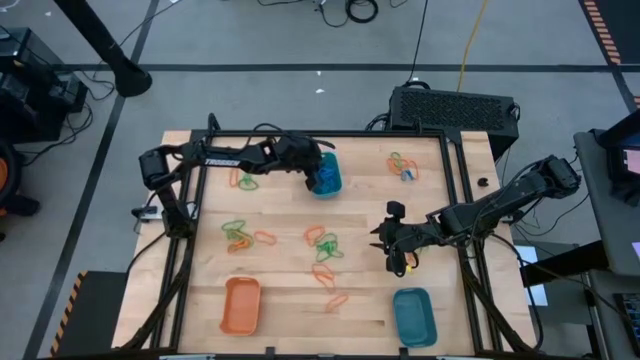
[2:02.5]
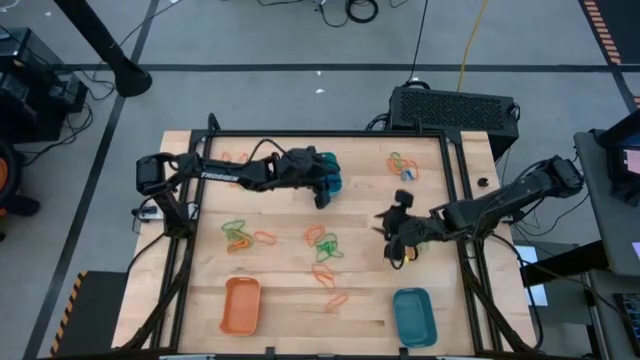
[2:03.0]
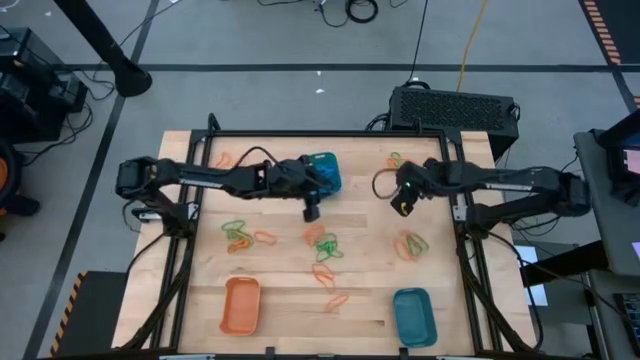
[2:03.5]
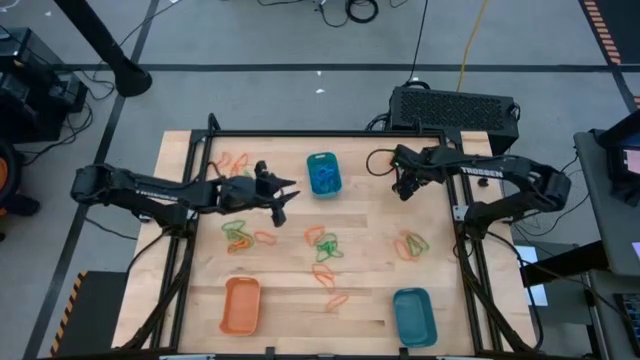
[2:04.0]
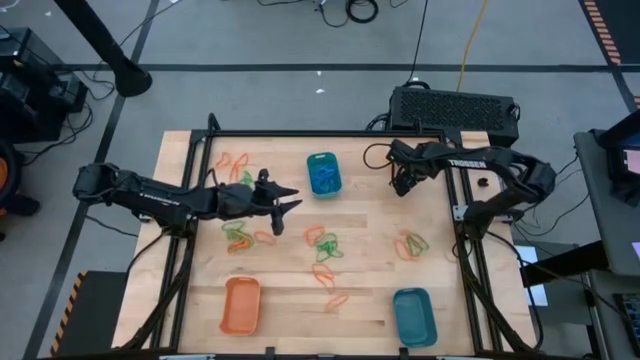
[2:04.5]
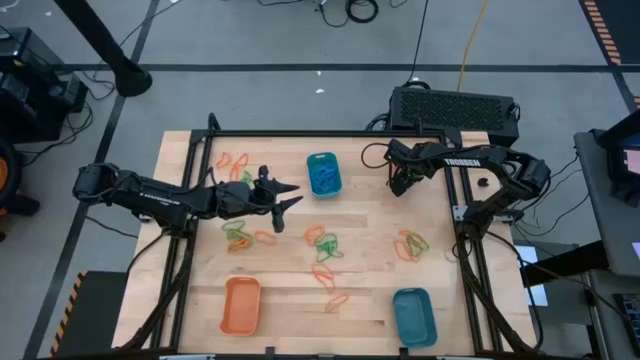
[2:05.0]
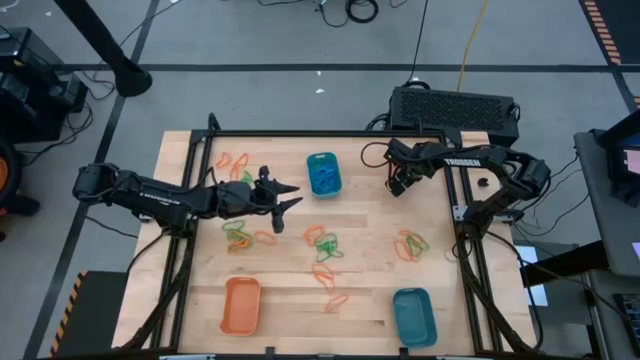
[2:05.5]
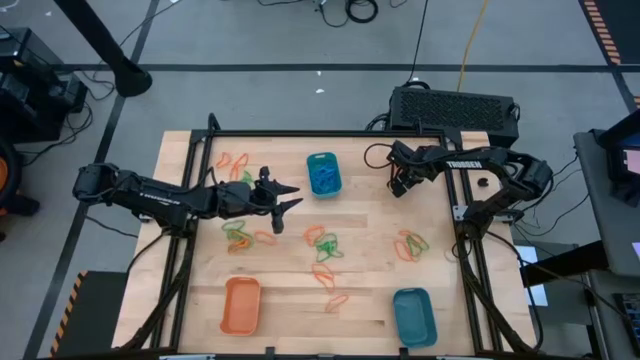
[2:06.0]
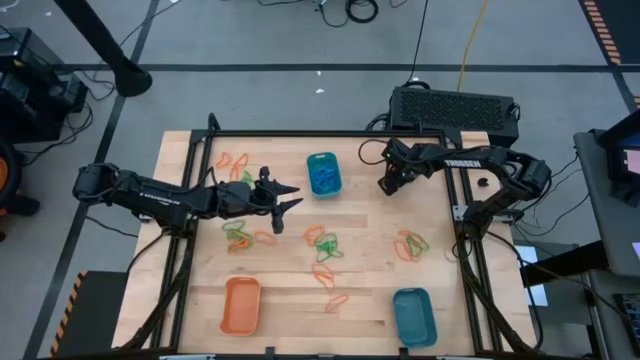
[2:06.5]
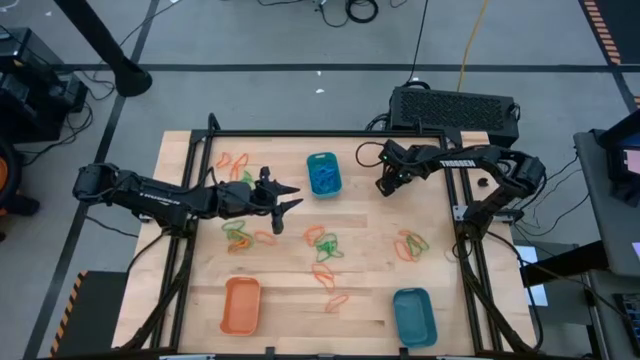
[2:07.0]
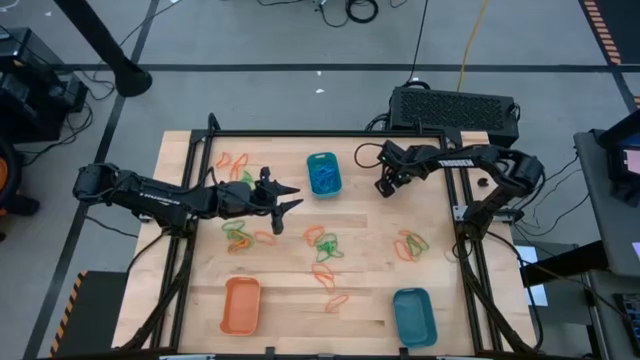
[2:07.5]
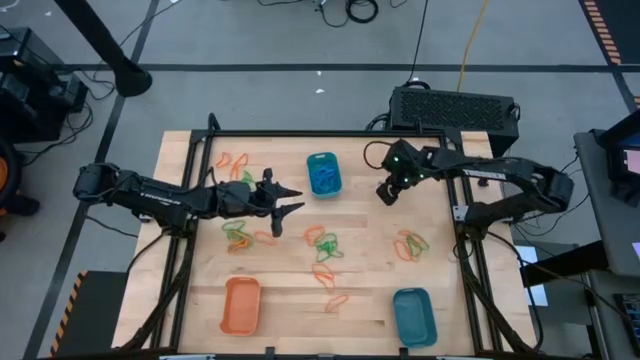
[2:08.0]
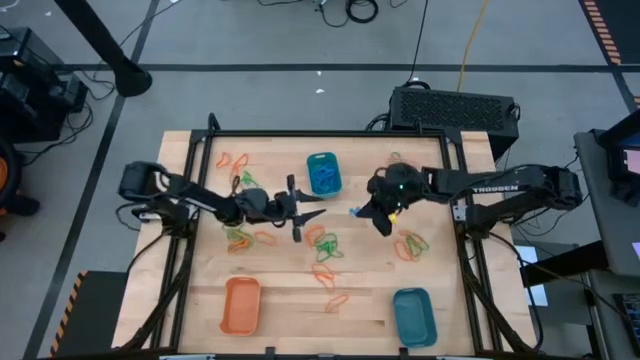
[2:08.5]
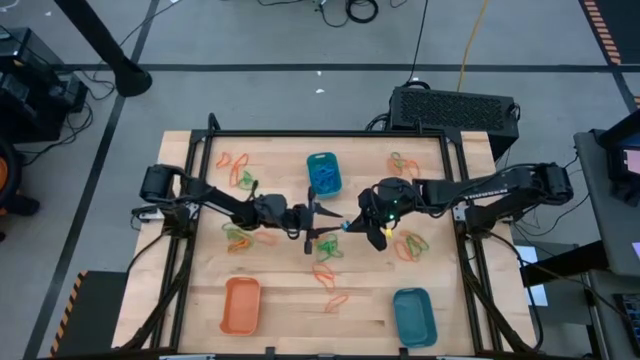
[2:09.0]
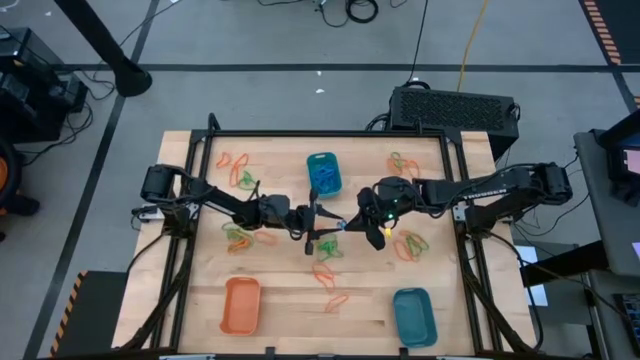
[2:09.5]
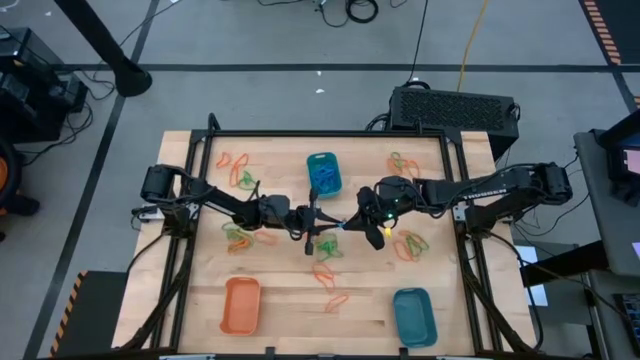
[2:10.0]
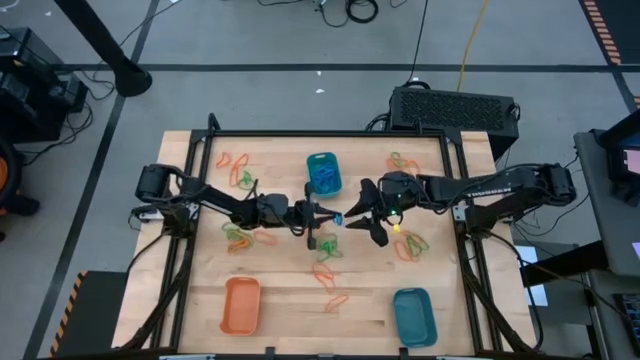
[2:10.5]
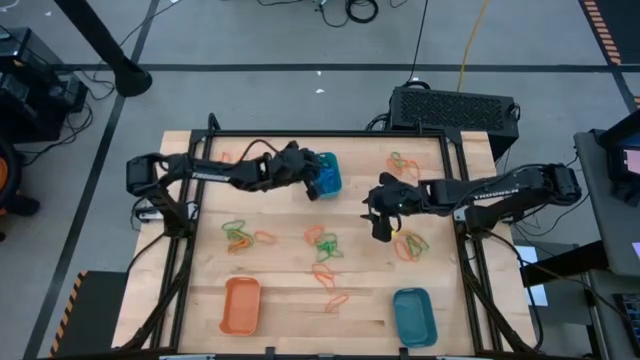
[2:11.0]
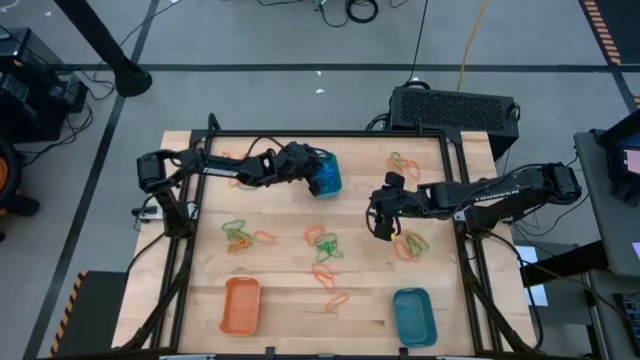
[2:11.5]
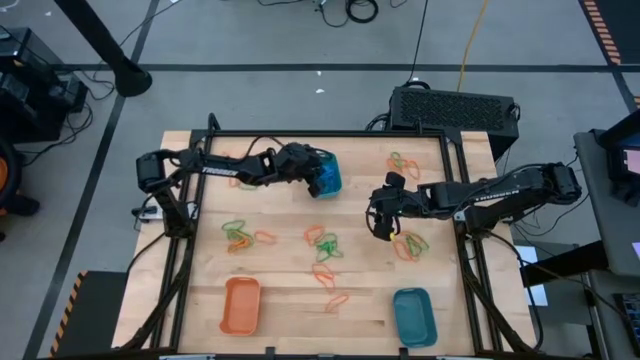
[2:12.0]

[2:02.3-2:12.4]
Task: Sort rubber bands into baskets
Put the blue rubber band into the top blue bin

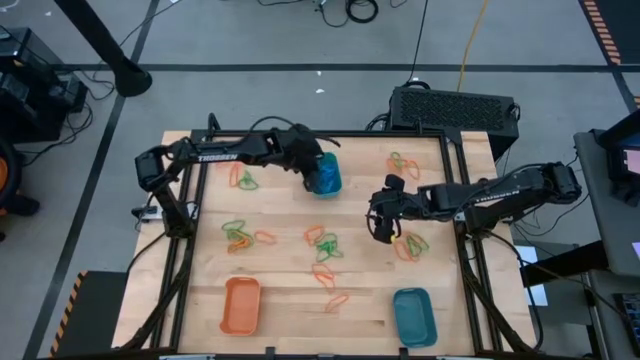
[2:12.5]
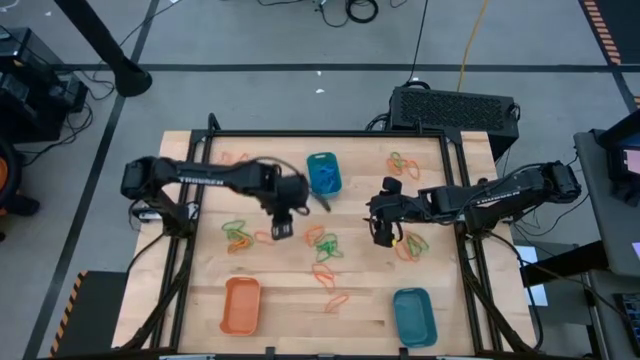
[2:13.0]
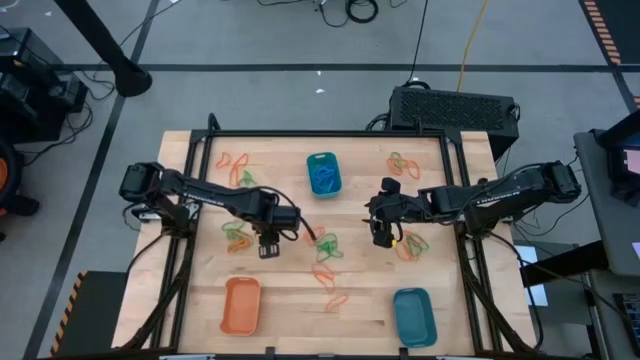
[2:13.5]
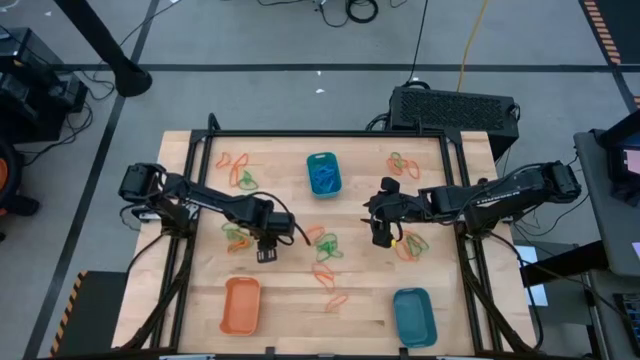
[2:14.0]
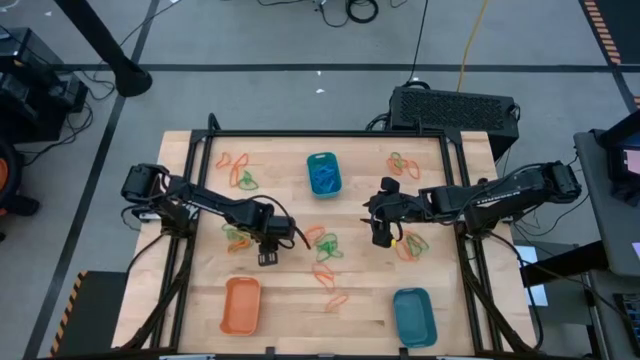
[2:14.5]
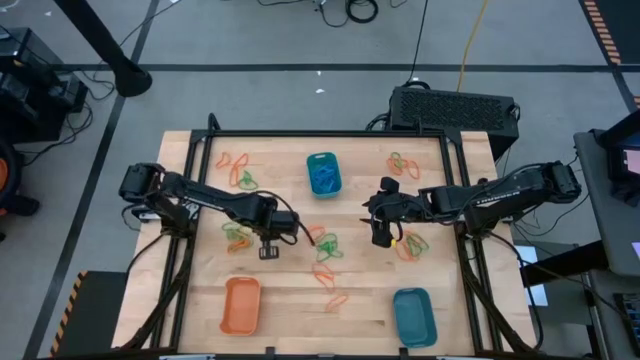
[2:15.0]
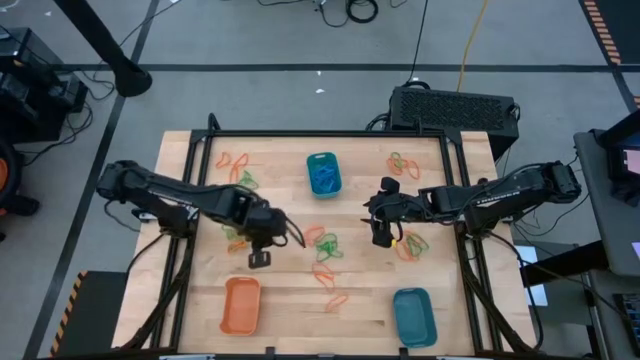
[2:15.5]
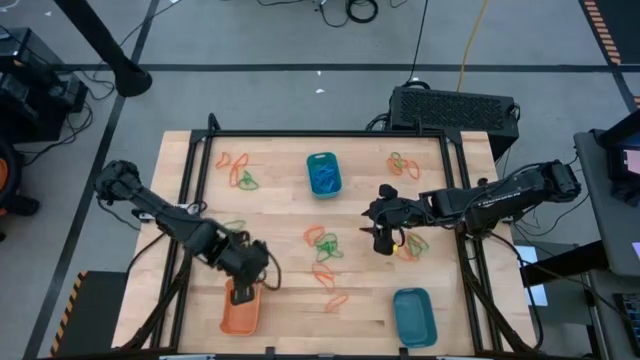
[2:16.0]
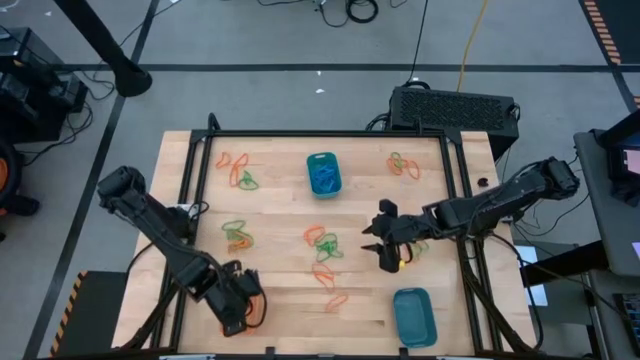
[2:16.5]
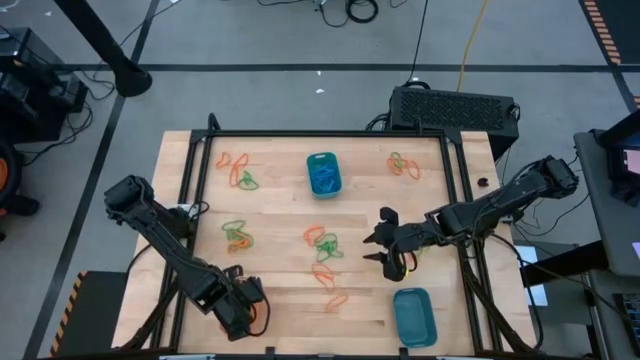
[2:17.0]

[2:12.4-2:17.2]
Put the orange rubber band into the orange bin

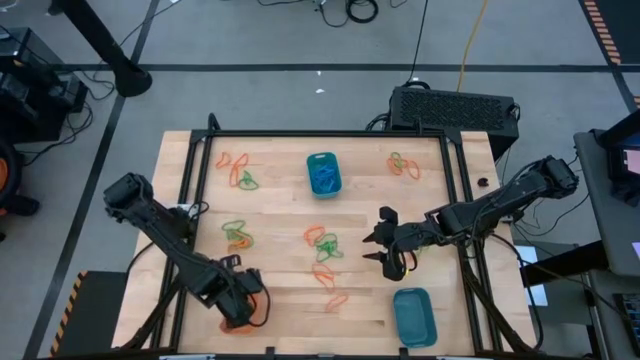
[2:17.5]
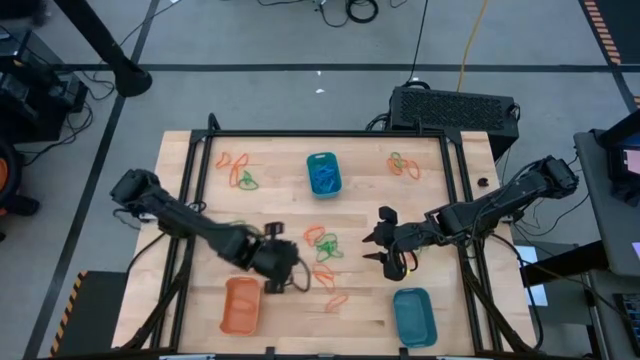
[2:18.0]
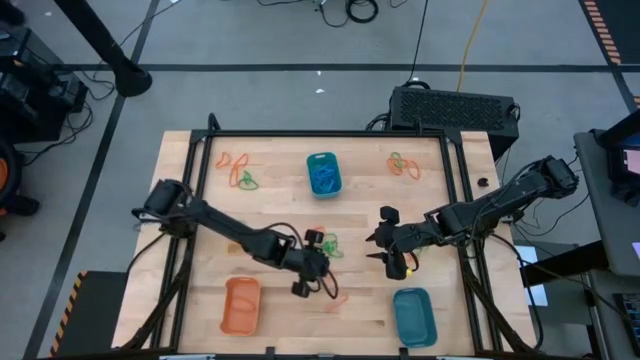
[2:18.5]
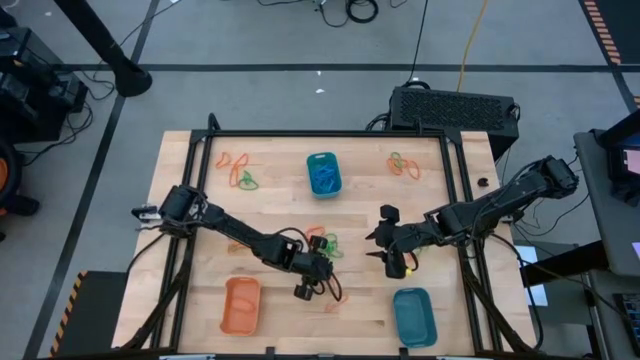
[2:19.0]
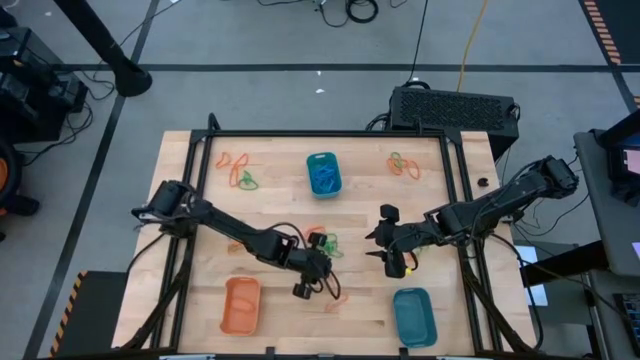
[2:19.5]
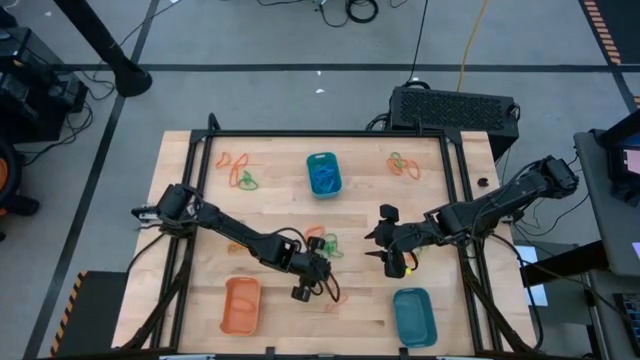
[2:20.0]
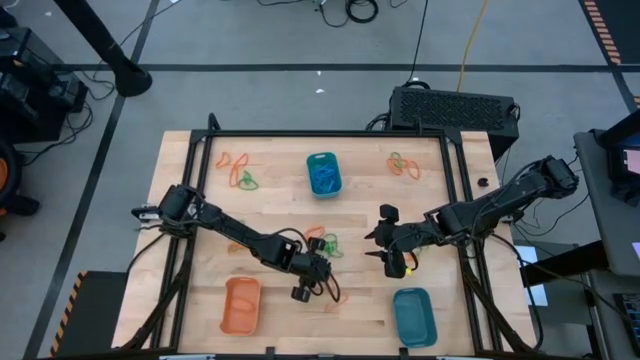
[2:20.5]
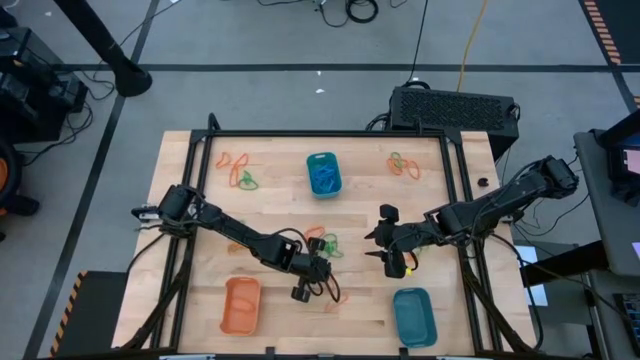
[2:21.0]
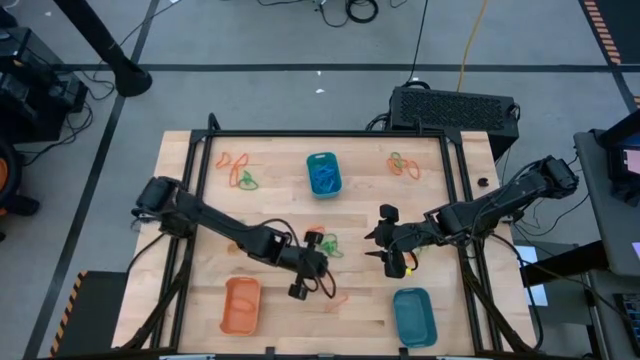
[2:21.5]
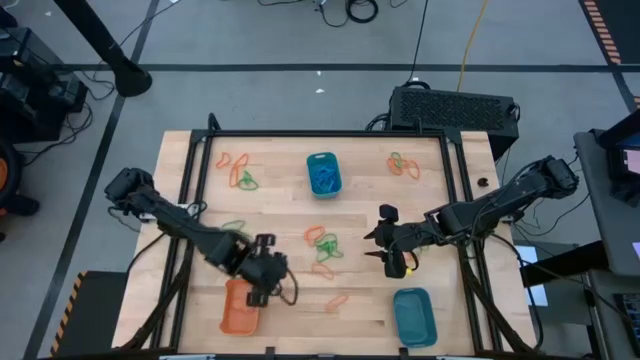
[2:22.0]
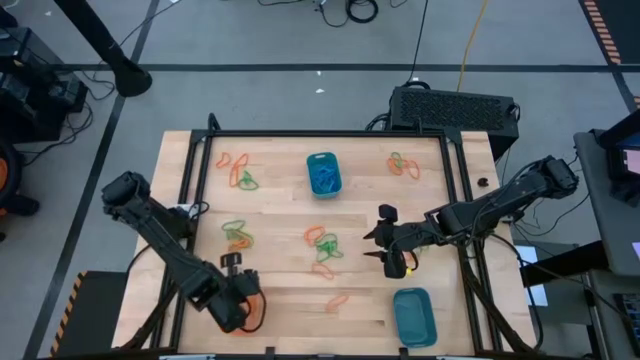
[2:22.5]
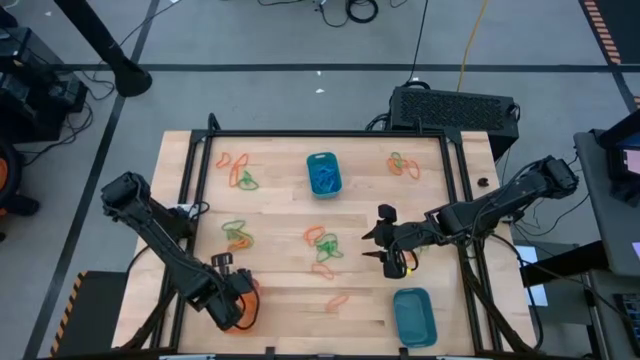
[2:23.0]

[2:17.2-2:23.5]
Put the orange rubber band into the orange bin
